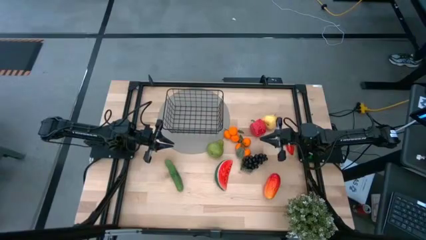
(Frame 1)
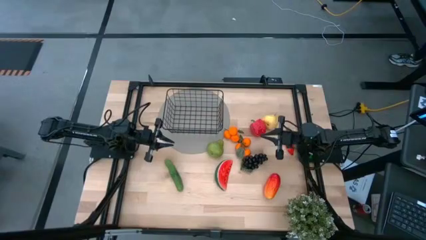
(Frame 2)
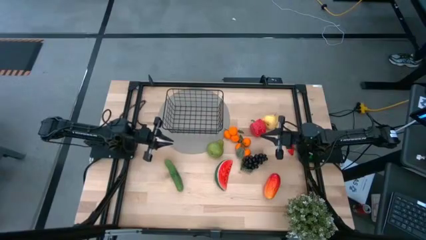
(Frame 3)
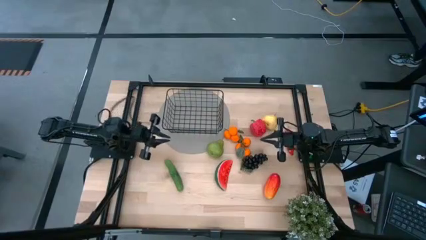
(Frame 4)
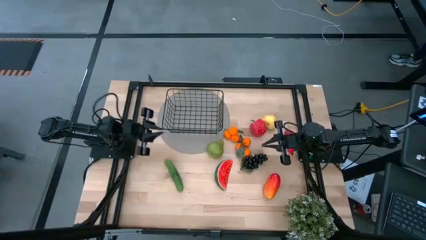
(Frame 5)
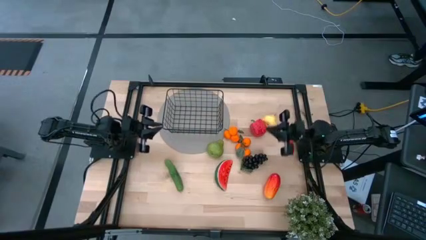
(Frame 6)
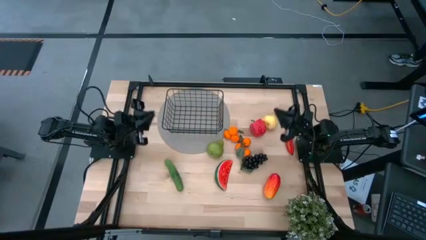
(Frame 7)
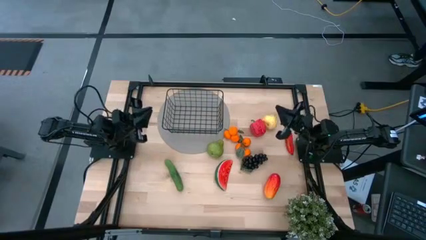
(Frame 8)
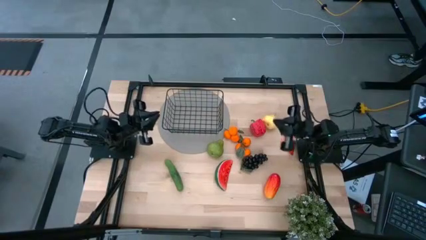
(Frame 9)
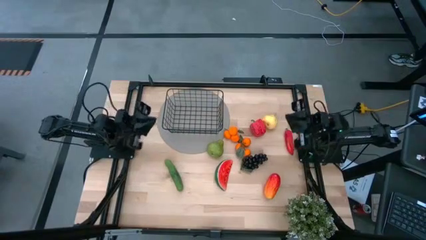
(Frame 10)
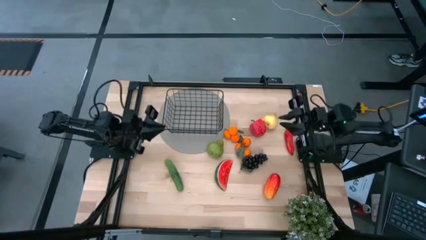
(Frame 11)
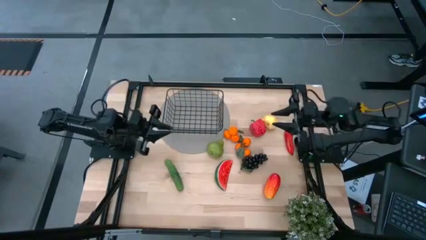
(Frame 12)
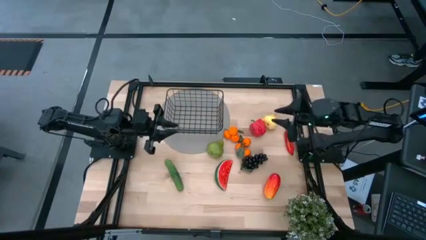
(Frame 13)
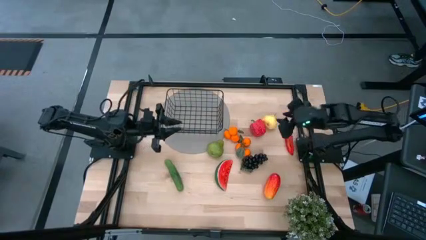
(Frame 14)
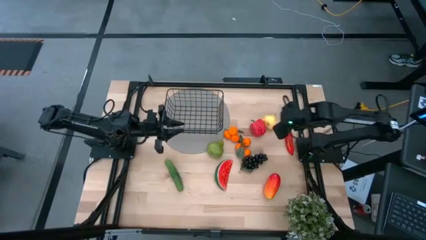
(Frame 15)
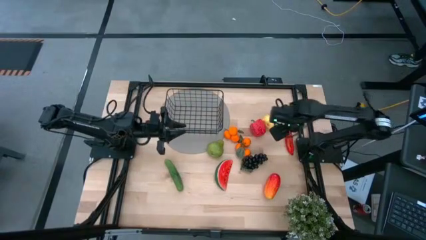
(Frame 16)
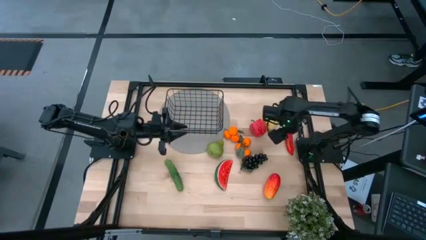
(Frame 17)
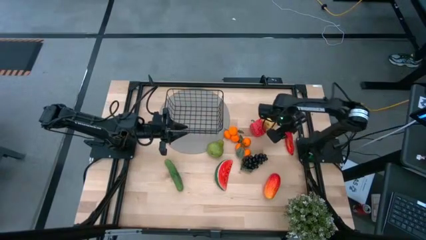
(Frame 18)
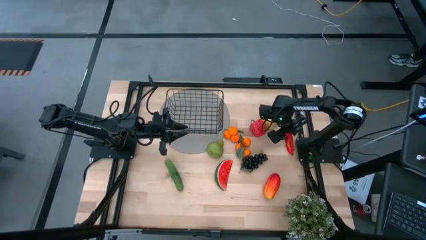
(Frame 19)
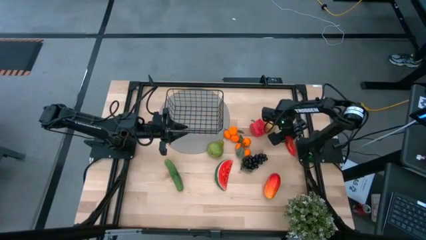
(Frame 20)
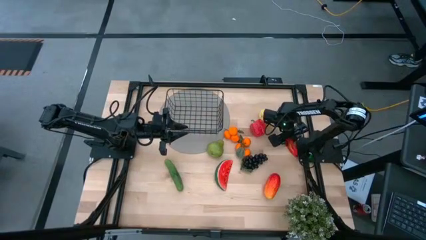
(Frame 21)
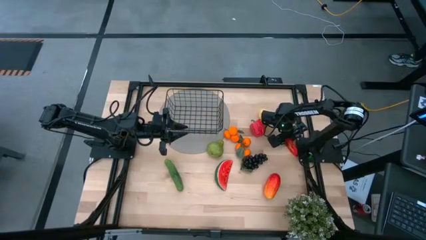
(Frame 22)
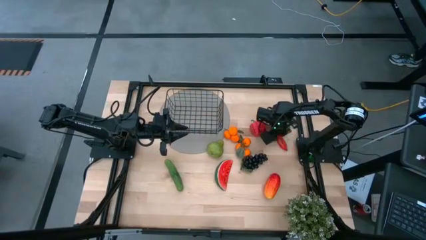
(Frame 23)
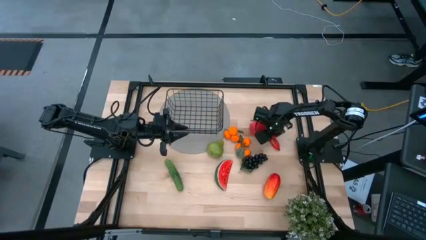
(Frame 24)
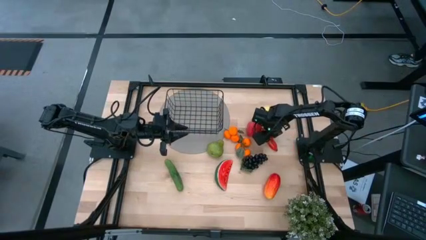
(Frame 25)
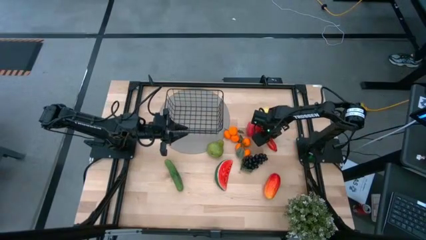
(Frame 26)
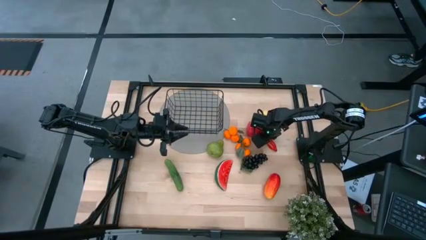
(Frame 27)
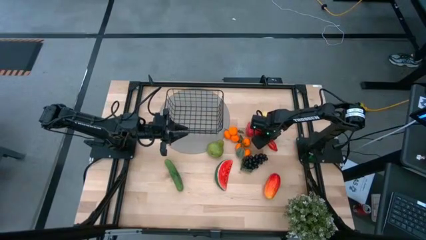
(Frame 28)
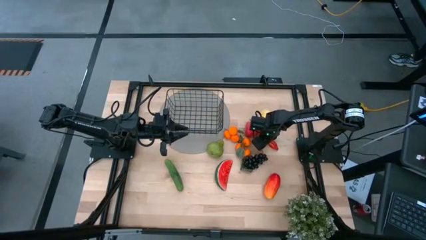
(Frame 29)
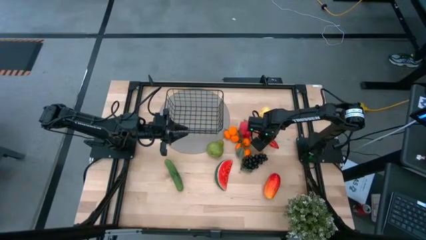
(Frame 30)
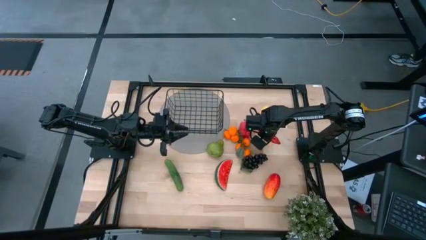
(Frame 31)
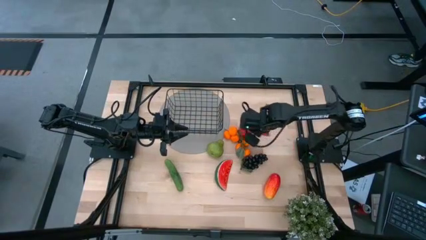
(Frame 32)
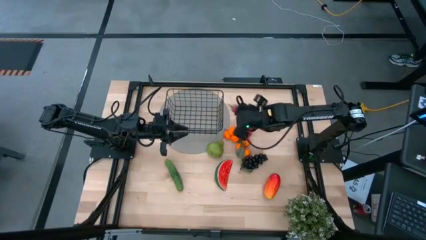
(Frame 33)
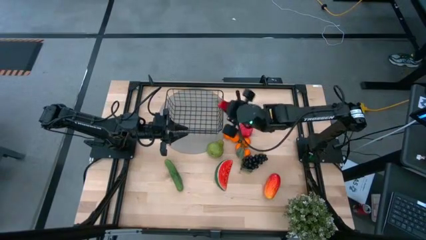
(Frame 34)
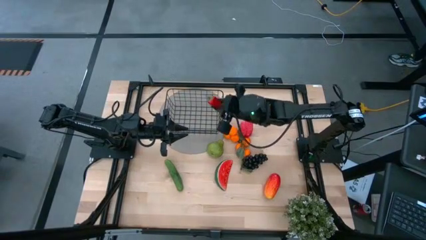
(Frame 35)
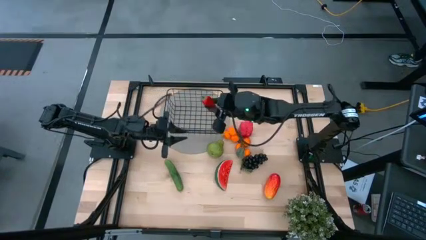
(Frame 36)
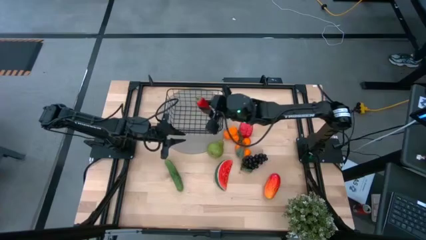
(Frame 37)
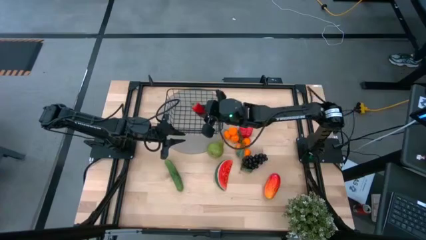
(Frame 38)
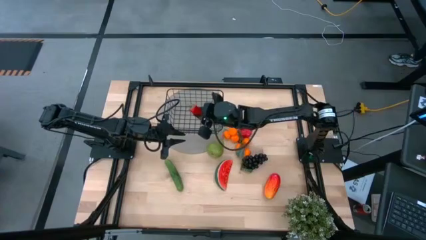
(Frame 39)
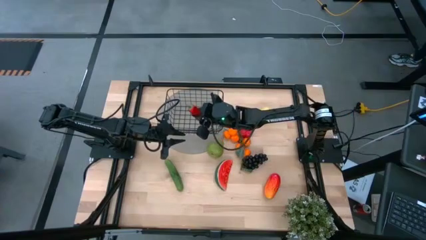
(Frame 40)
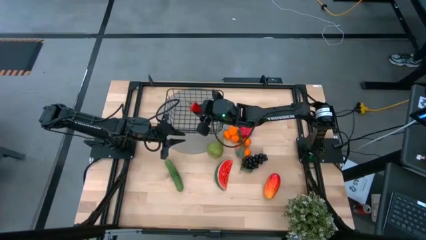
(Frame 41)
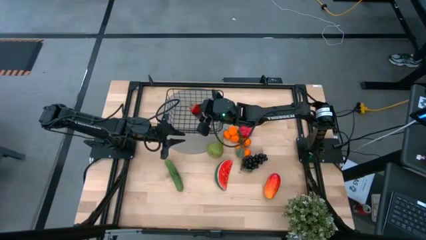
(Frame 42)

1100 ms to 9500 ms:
Task: Build produce basket
Put the red chili pepper into the wire basket

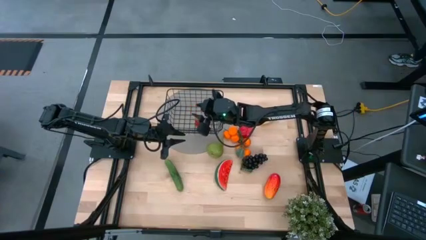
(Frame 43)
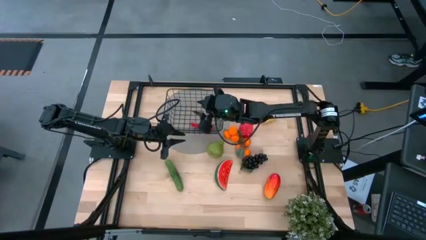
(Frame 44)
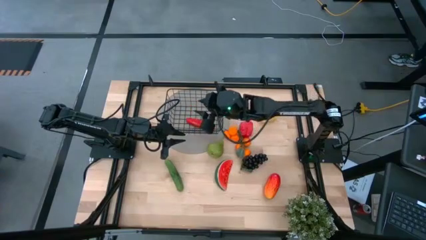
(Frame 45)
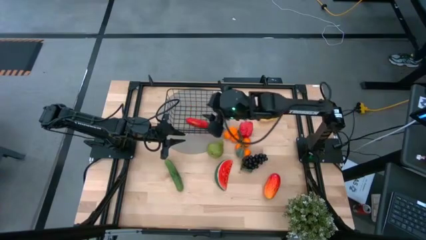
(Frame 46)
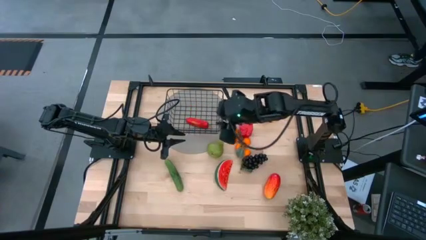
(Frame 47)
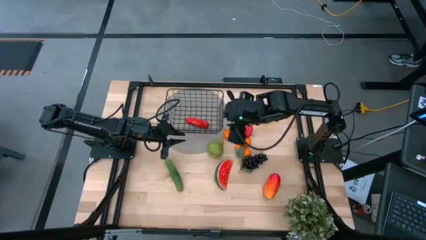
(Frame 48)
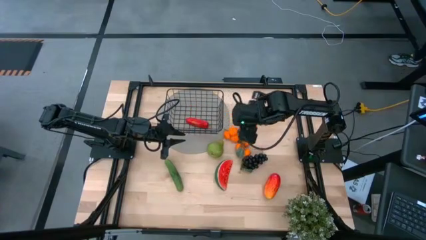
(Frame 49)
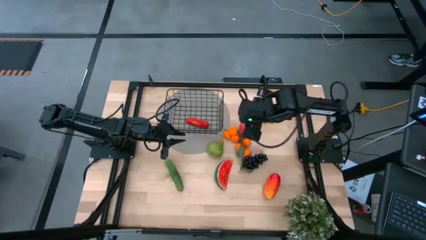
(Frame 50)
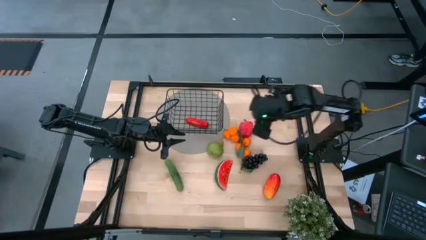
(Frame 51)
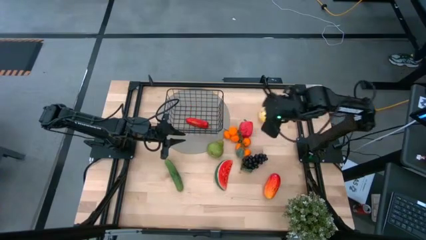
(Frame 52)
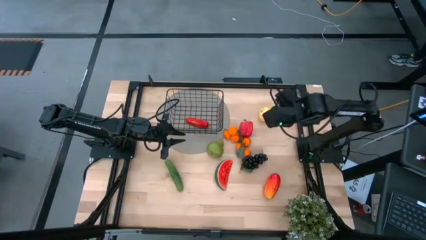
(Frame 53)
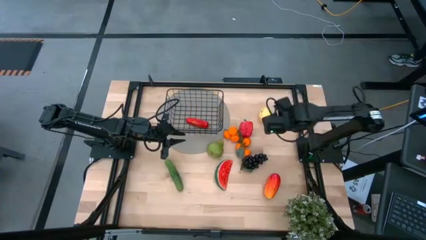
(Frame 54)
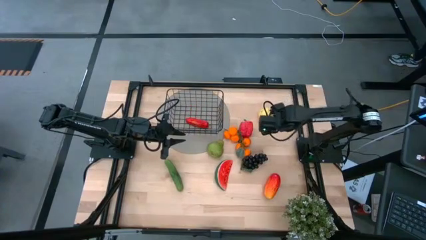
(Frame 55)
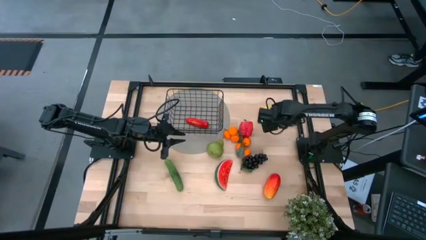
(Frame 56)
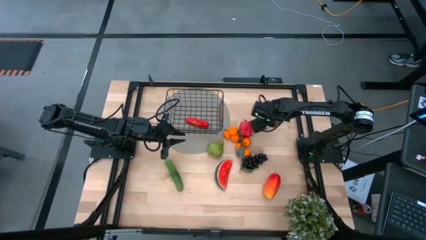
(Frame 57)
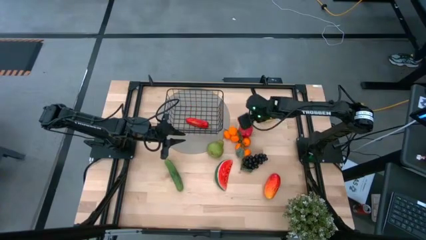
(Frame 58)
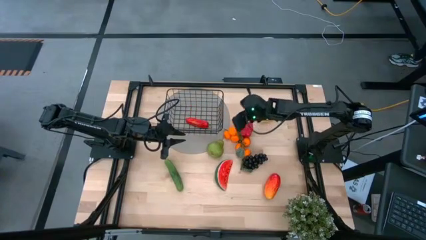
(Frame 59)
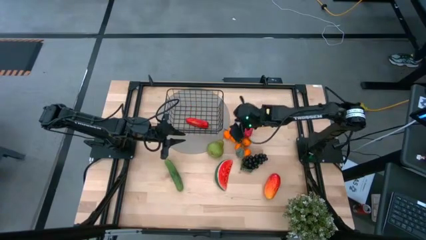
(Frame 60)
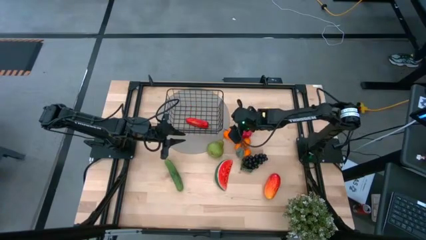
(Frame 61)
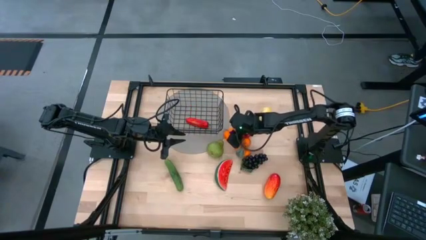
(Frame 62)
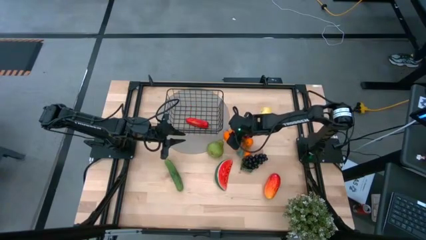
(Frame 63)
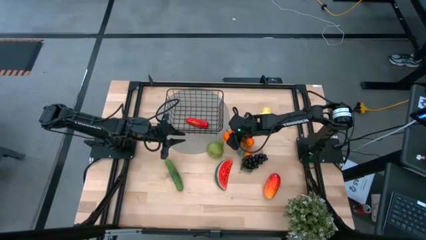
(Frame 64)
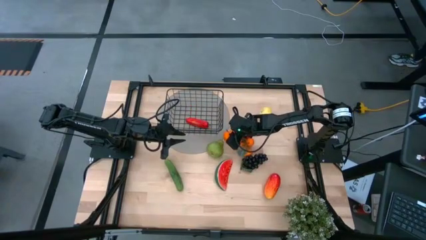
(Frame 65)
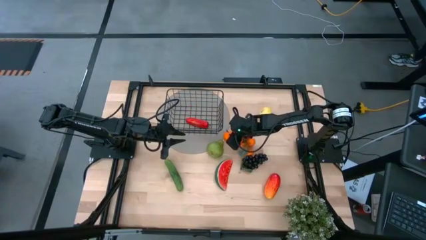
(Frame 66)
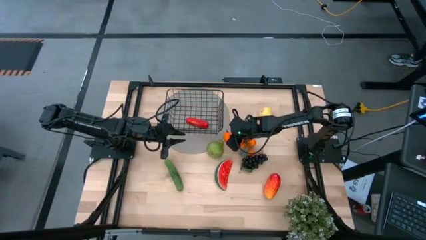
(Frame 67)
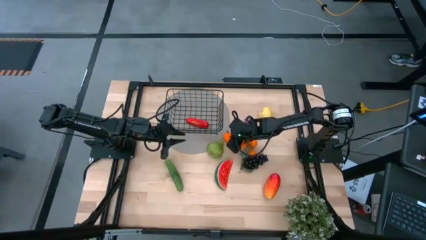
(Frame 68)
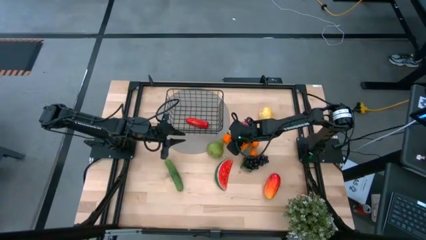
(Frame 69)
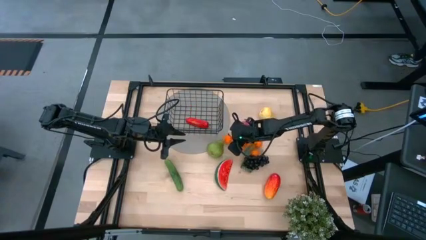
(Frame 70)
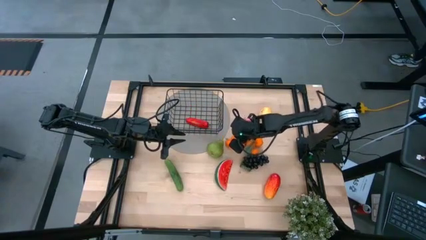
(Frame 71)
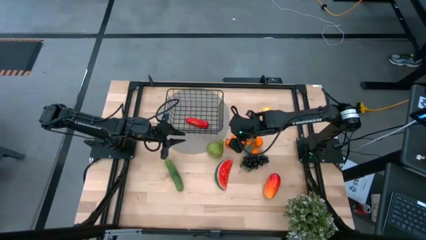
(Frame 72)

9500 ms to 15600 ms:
Put the top tangerine into the wire basket

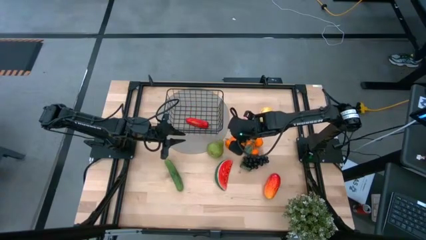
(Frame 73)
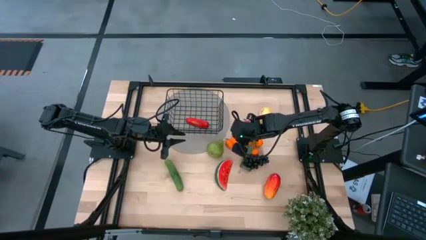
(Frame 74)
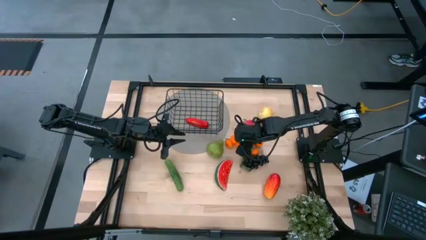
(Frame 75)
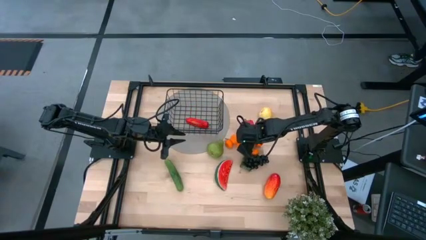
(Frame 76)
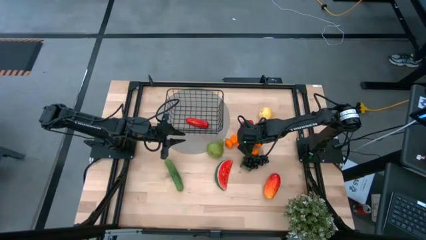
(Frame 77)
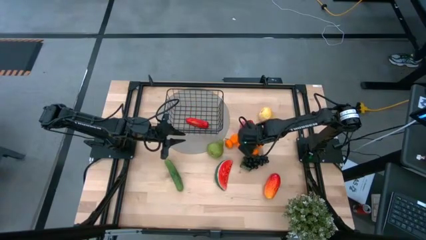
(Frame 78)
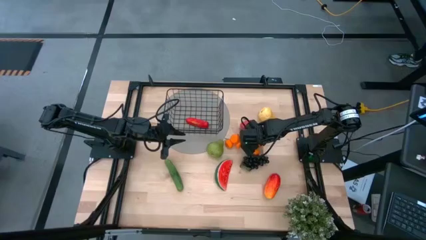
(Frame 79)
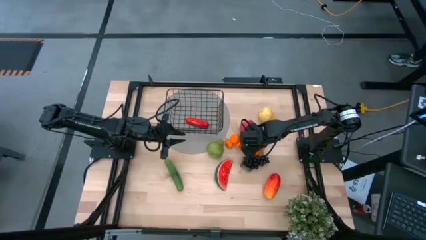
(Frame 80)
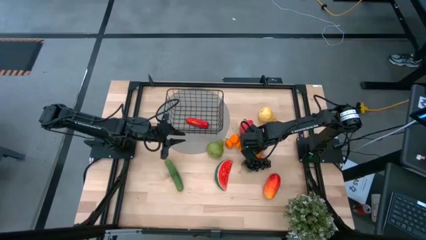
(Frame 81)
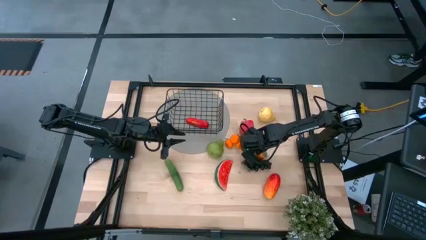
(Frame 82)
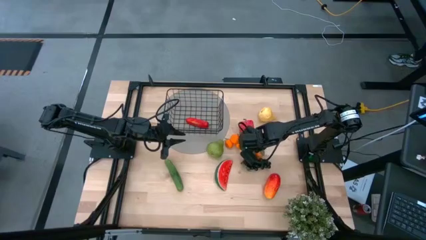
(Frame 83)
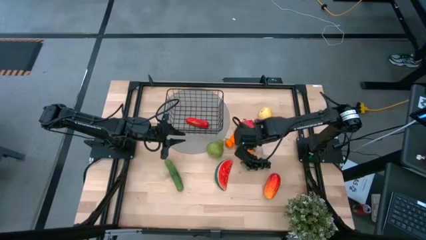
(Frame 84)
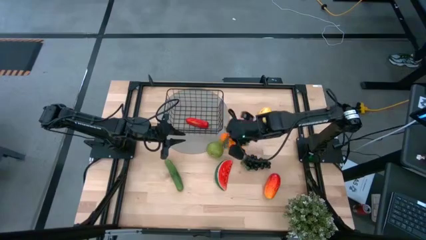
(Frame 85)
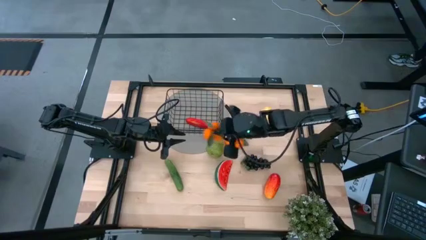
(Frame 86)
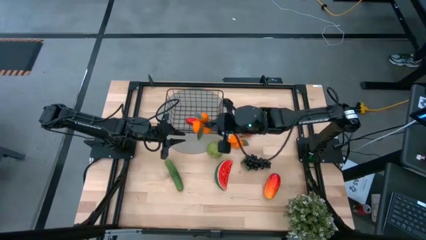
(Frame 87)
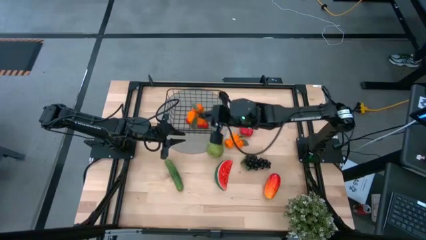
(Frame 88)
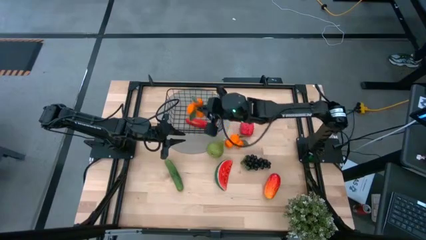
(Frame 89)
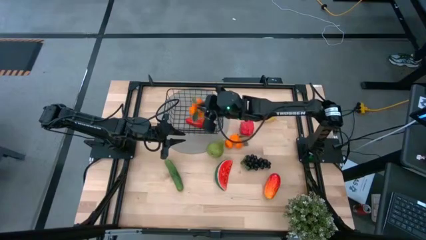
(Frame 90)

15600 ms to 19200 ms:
Put the right tangerine into the wire basket
